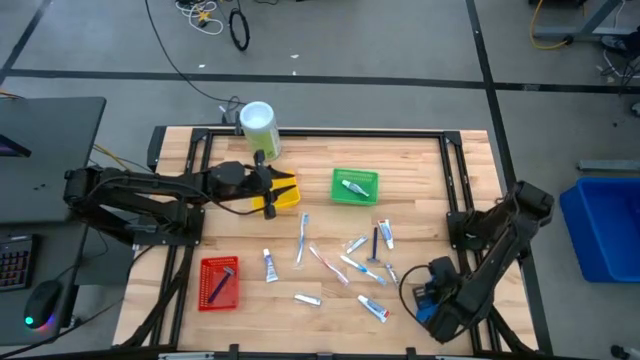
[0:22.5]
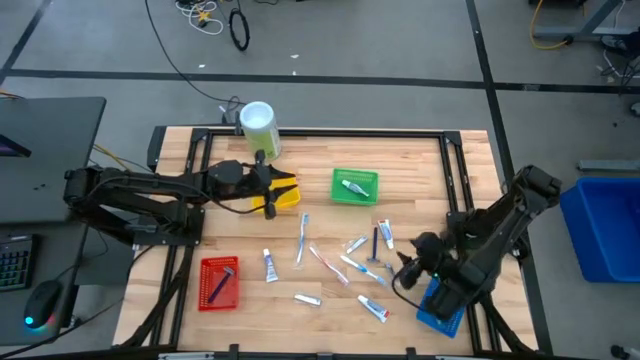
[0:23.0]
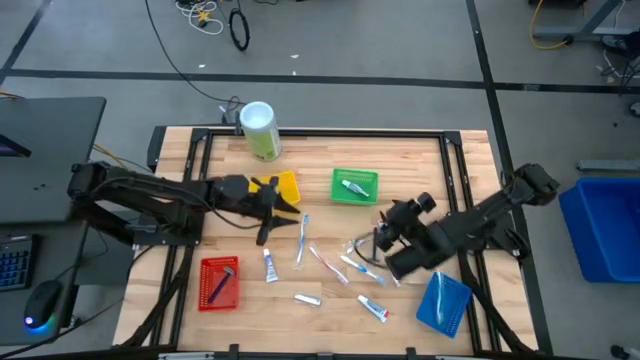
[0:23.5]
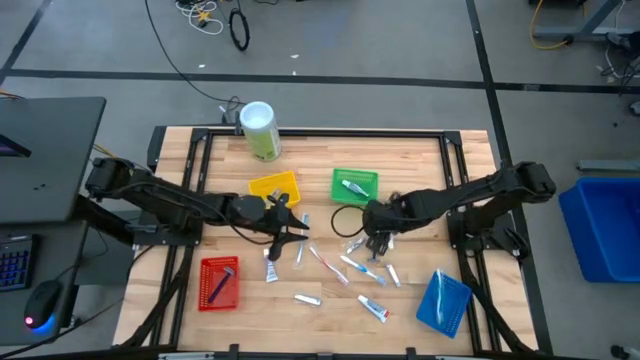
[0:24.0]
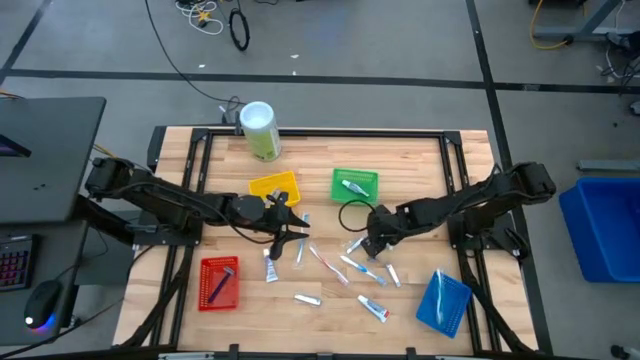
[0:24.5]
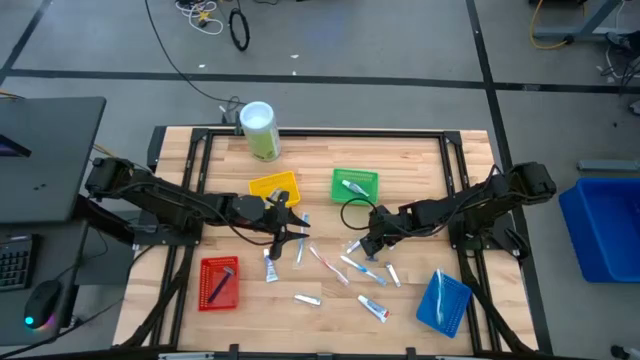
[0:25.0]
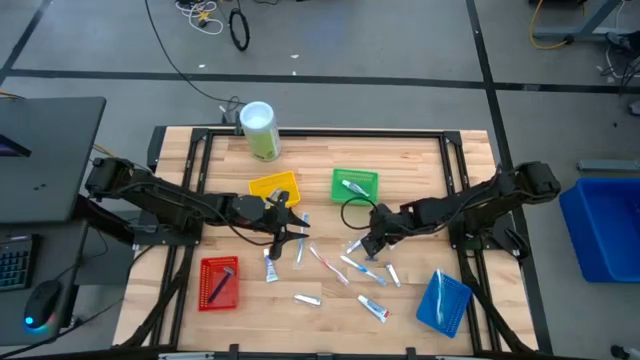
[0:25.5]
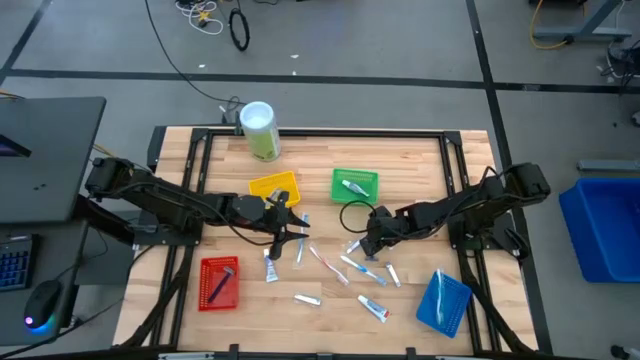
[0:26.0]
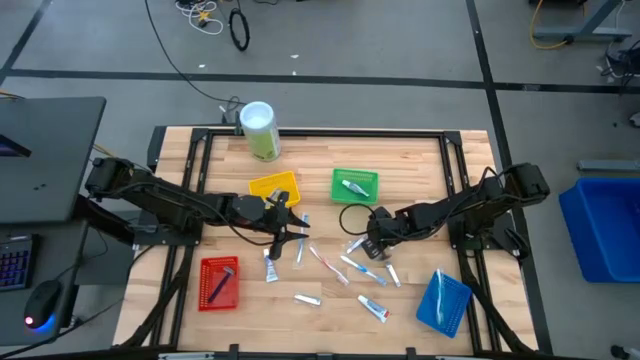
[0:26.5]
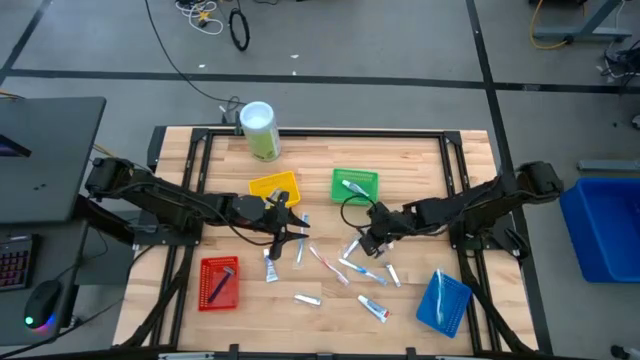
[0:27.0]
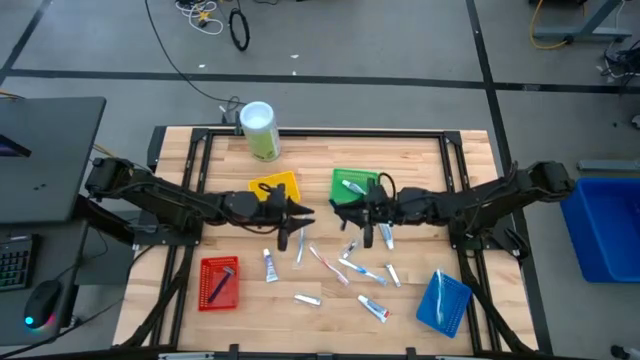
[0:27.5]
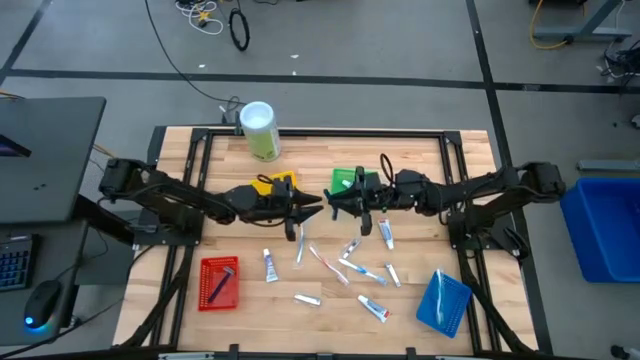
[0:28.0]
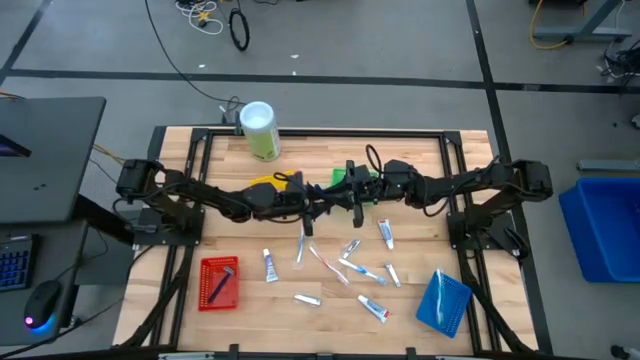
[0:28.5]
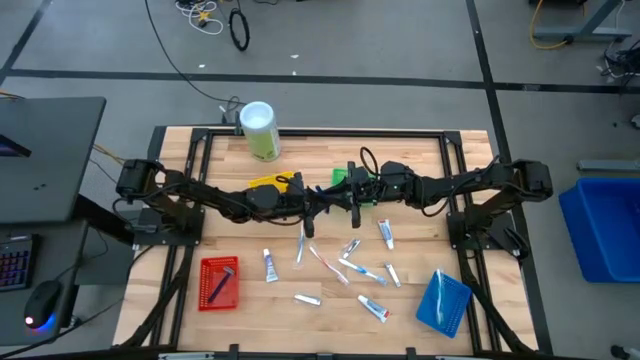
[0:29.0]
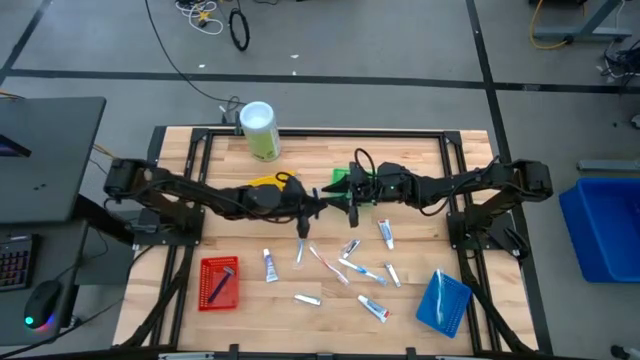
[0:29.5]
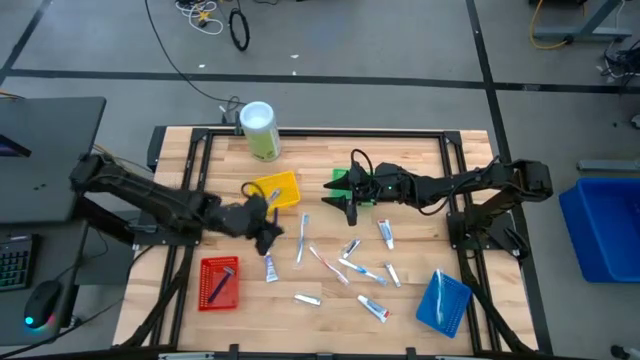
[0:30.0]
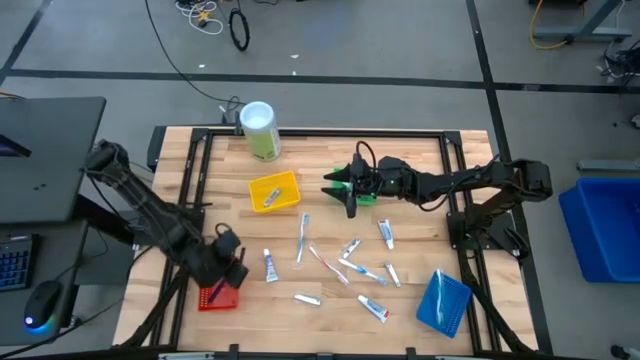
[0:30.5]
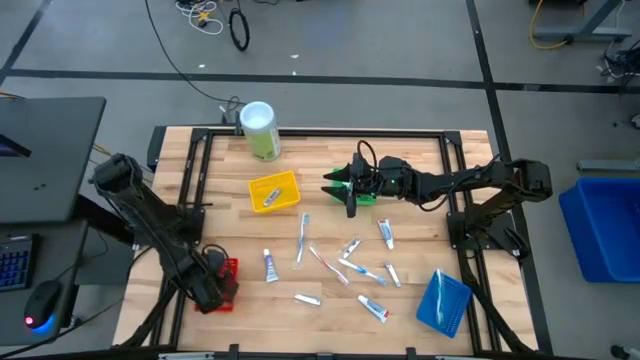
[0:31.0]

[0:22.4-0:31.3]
Task: Pick & Place Travel size toiletries
Put the blue razor into the red bin

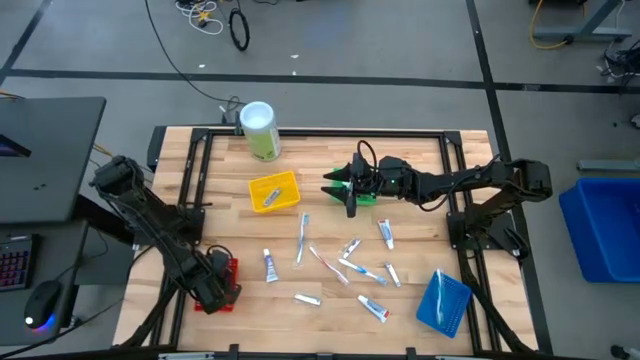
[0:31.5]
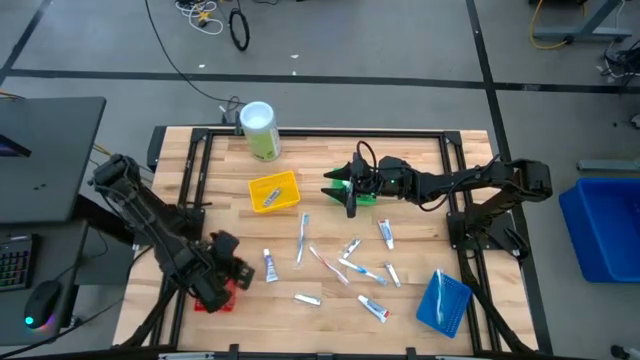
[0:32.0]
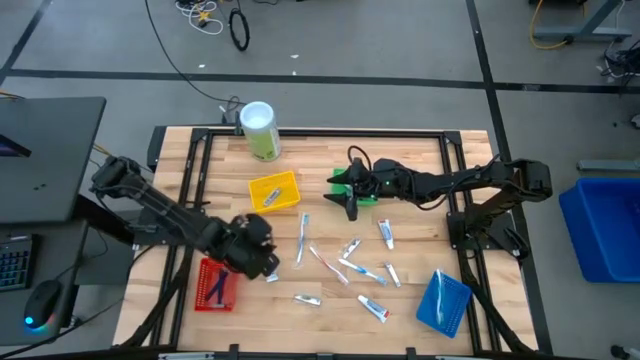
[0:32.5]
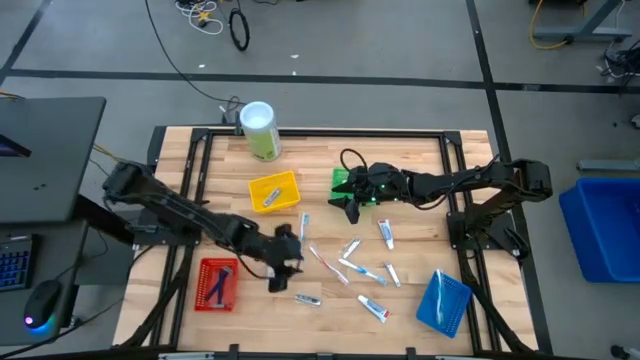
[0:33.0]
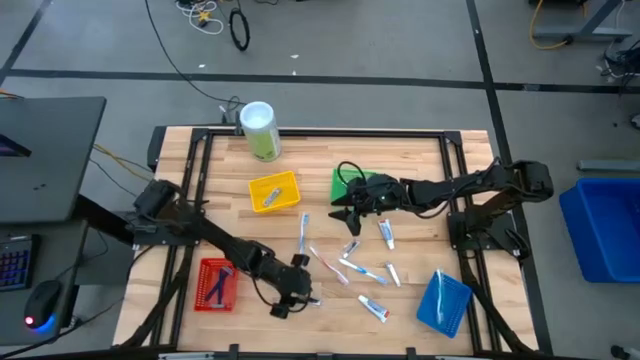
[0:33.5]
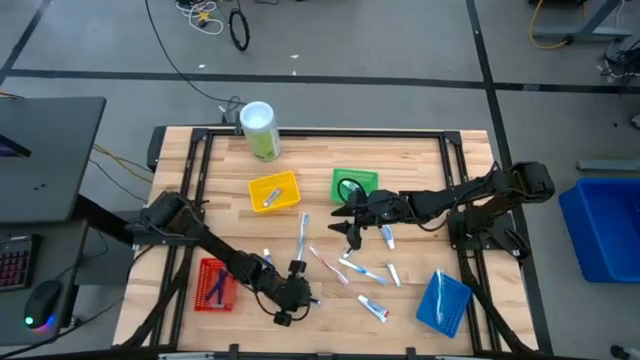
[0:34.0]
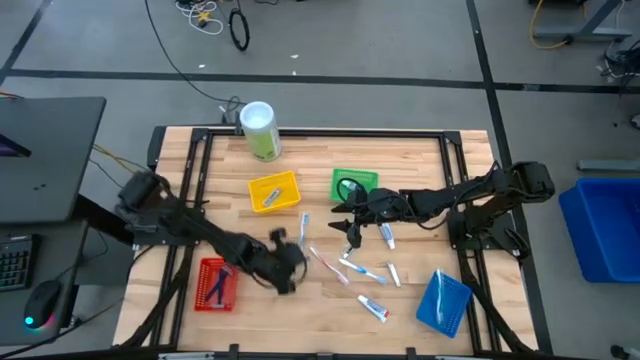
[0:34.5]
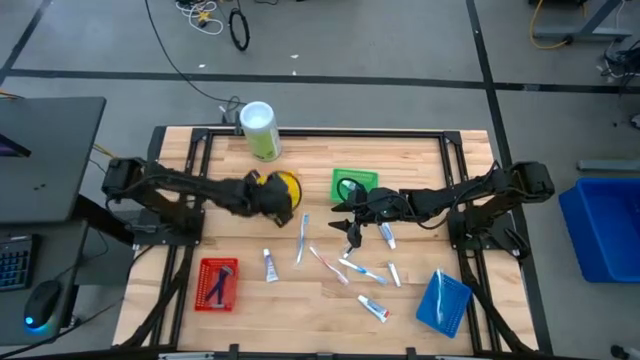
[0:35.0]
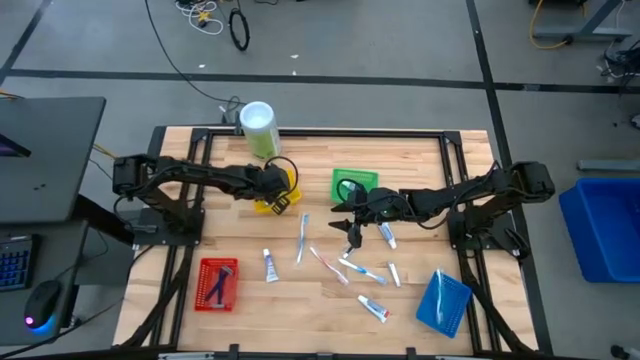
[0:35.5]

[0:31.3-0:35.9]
Put the silver nail cutter into the yellow bin

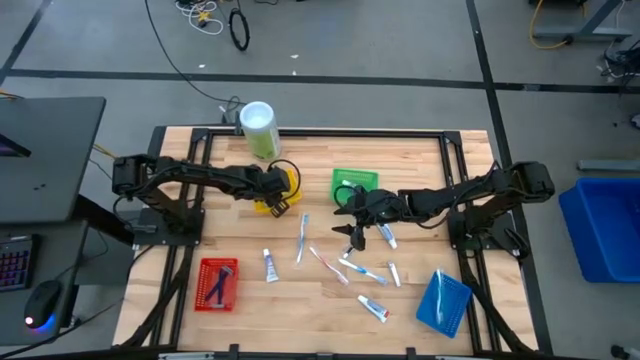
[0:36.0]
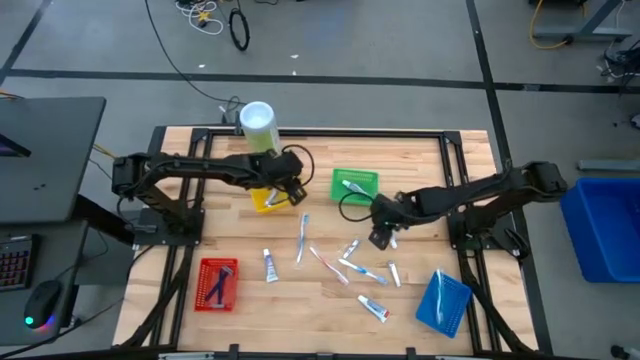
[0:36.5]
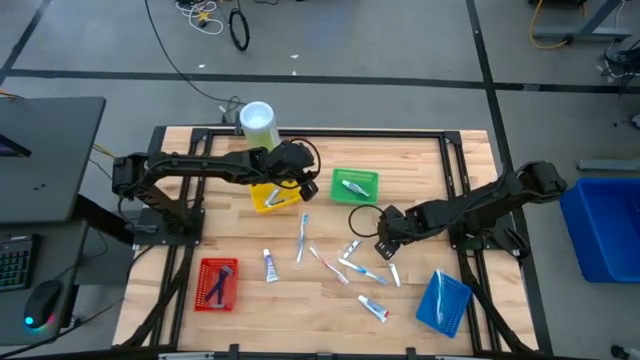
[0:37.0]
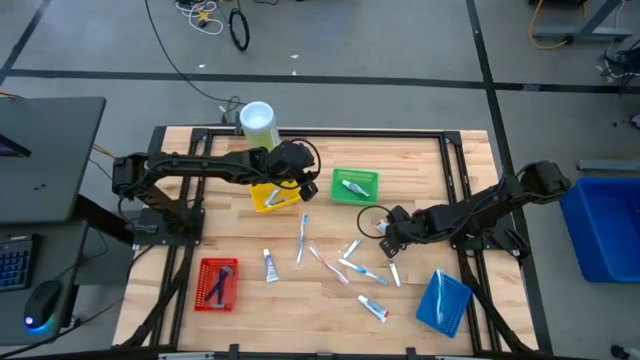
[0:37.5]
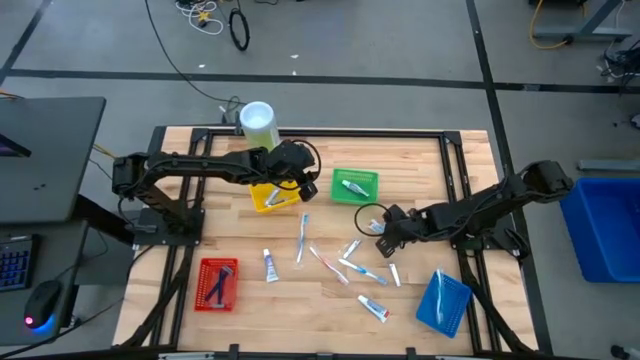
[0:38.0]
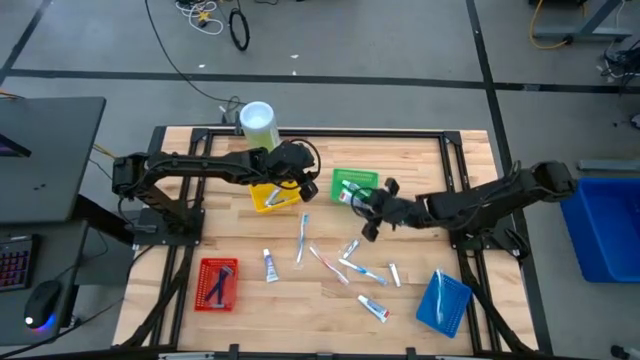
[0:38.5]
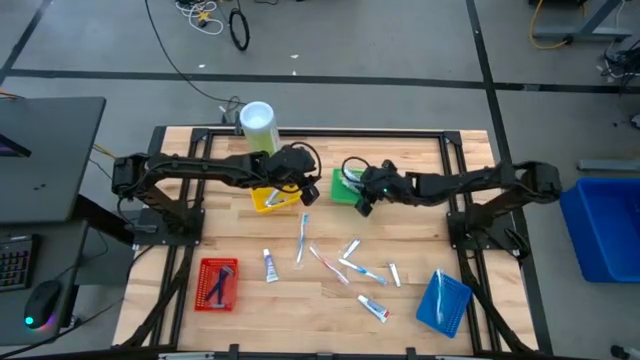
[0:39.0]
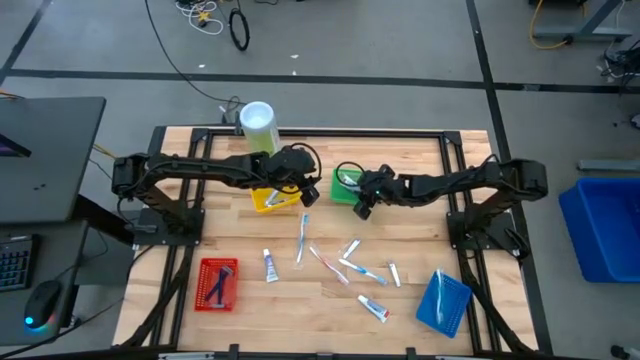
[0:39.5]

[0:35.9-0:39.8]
Put the white toothpaste into the green bin

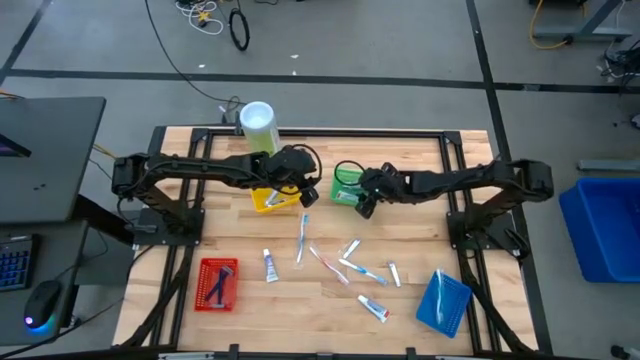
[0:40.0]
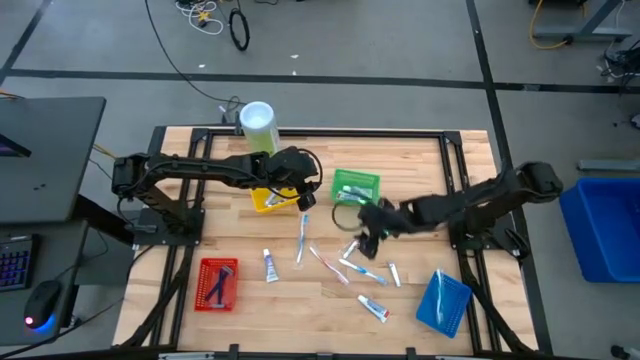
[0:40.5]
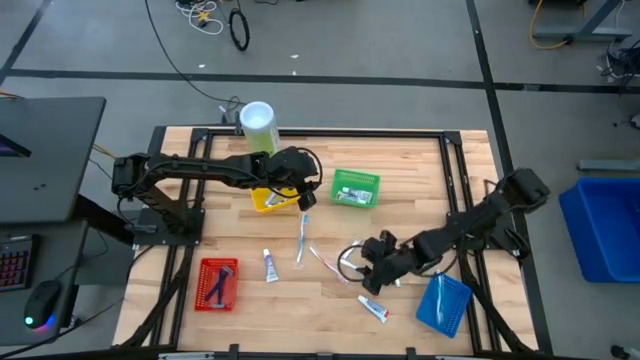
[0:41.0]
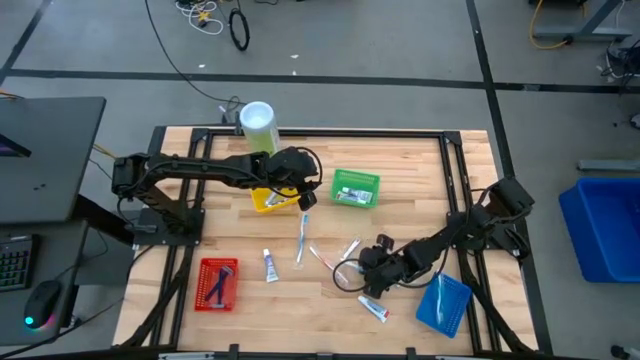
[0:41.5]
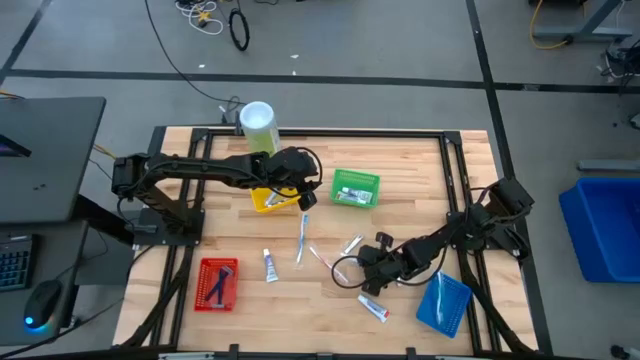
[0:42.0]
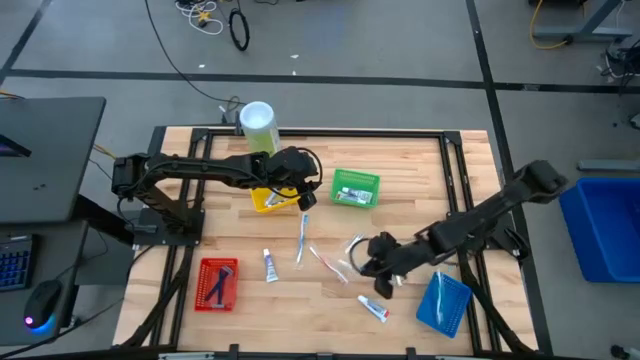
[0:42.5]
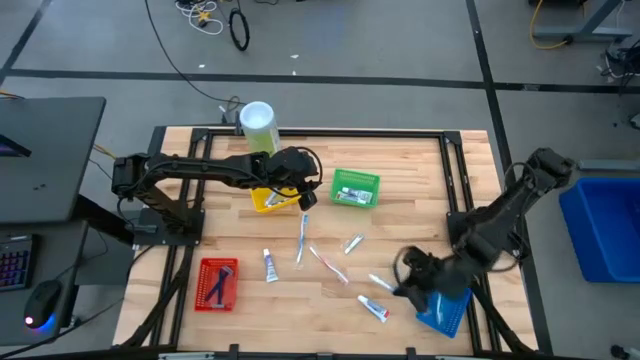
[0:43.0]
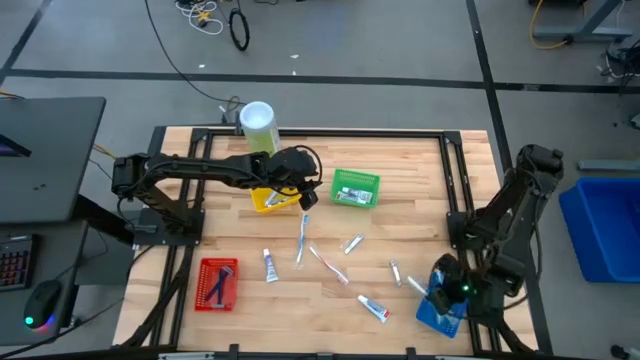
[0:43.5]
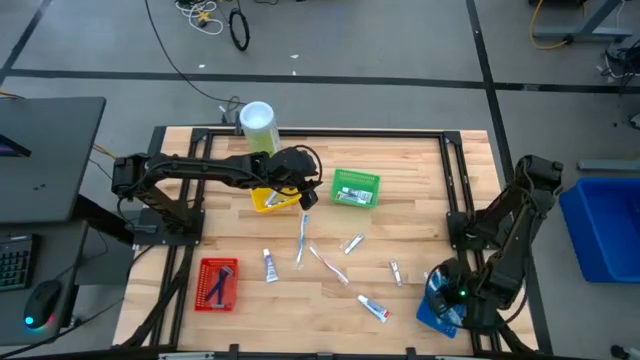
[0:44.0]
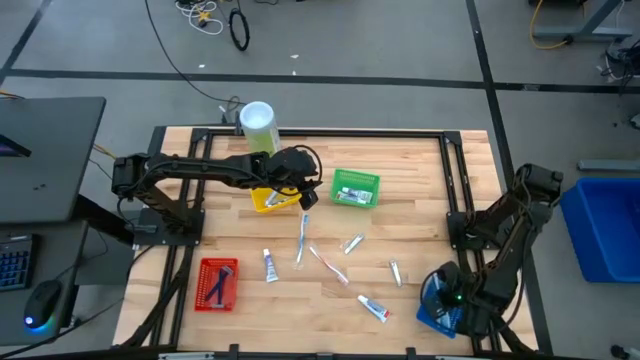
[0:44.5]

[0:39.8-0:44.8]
Put the blue toothbrush into the blue bin
